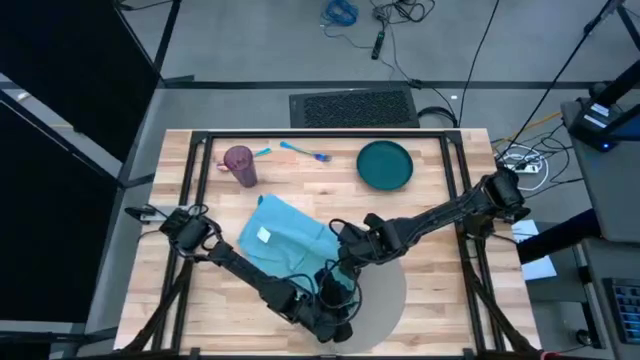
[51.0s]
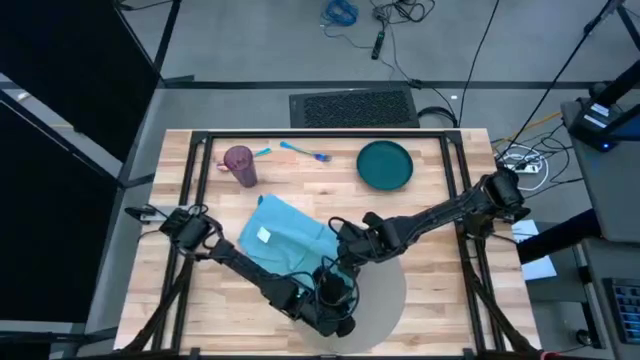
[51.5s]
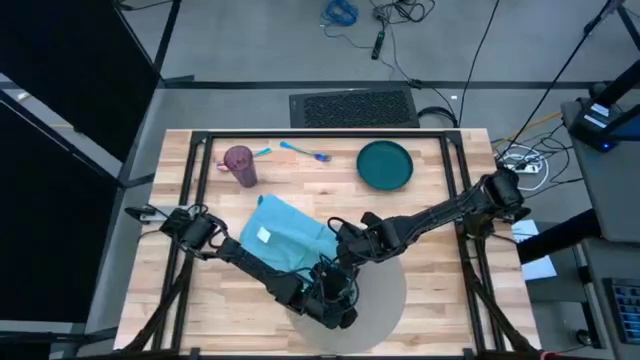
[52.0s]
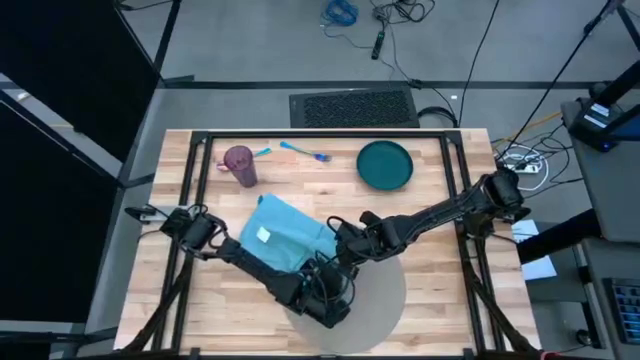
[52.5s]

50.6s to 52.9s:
Task: Set table place
Fold the blue napkin

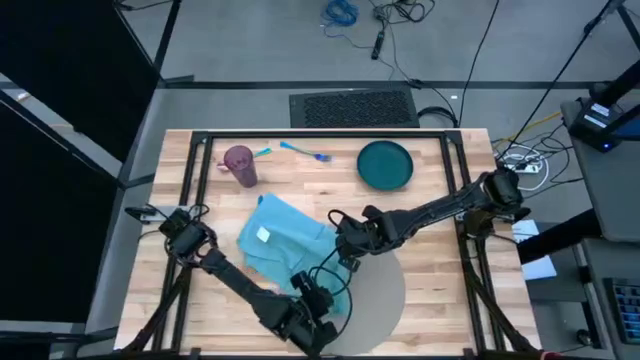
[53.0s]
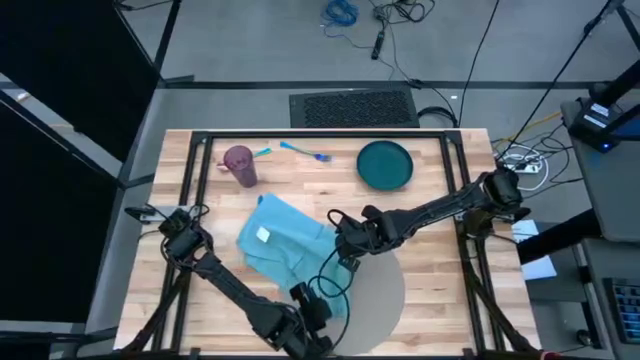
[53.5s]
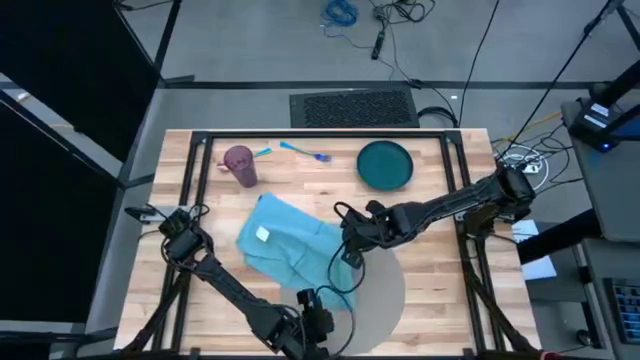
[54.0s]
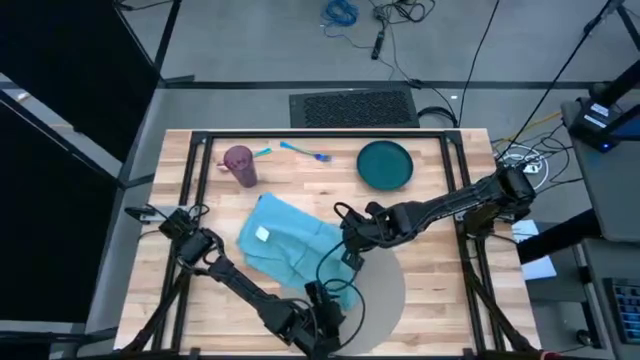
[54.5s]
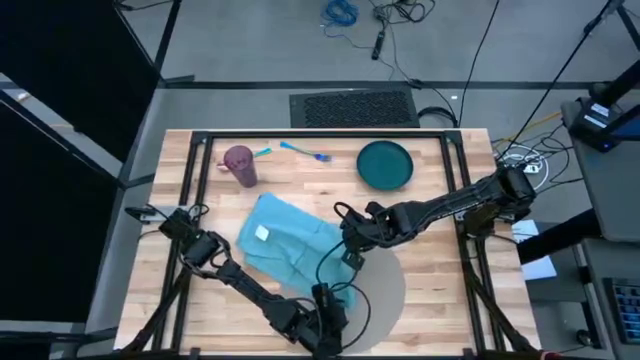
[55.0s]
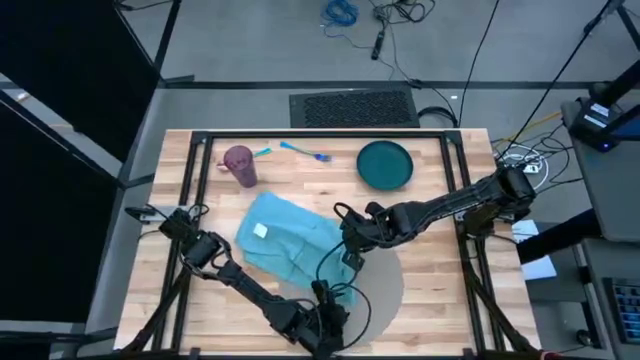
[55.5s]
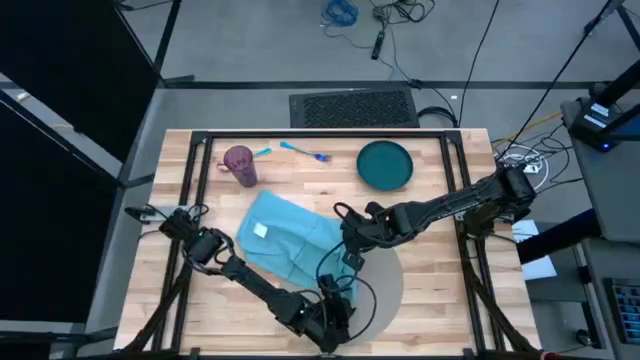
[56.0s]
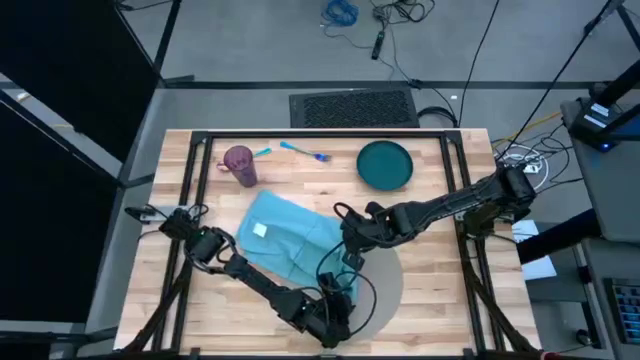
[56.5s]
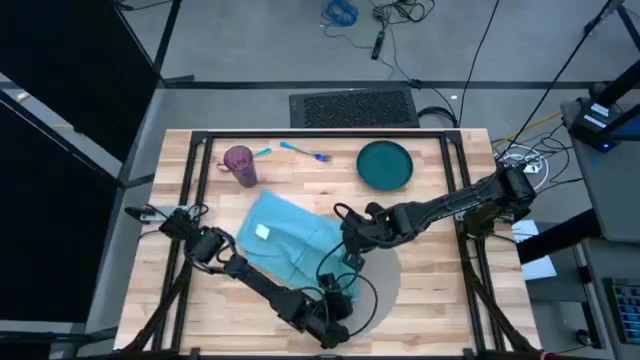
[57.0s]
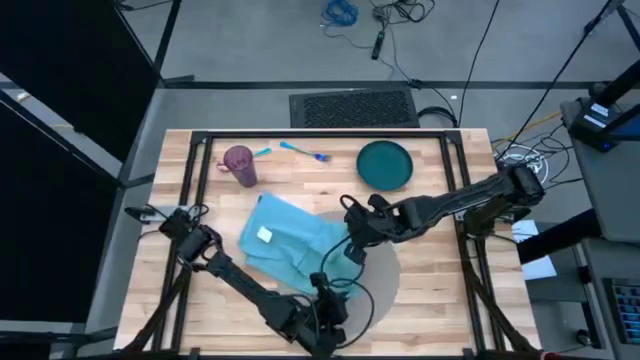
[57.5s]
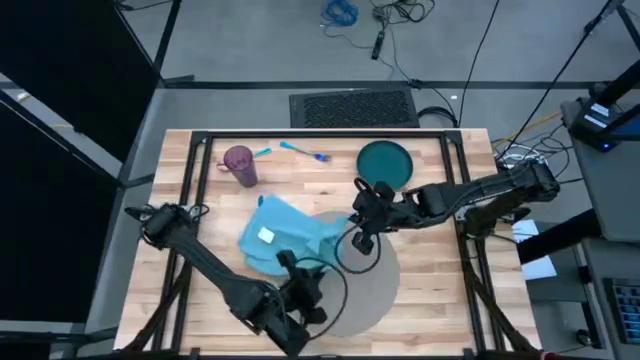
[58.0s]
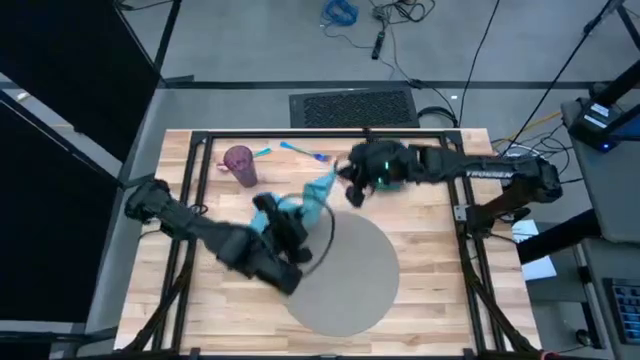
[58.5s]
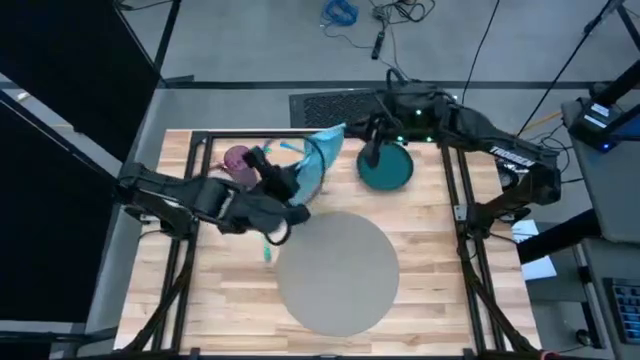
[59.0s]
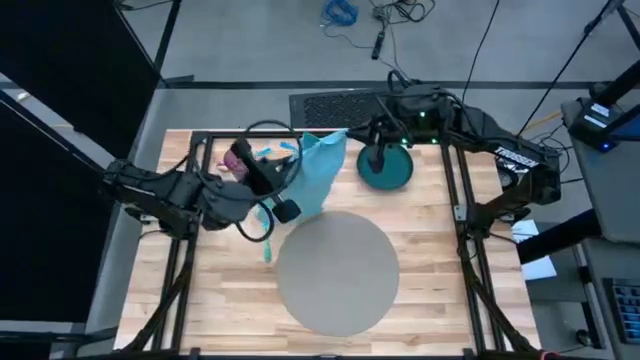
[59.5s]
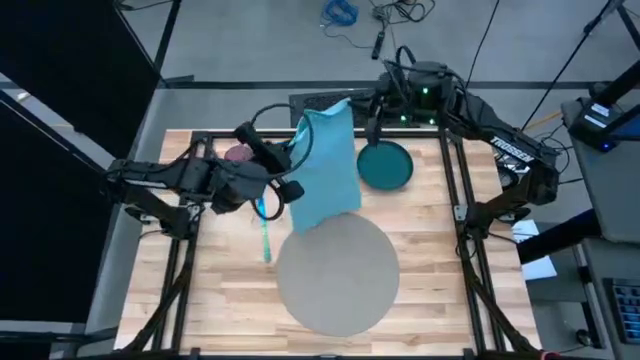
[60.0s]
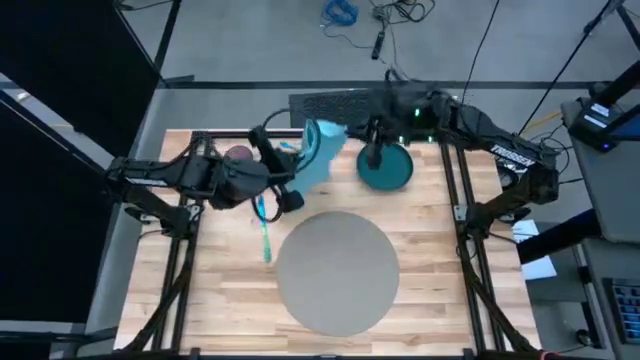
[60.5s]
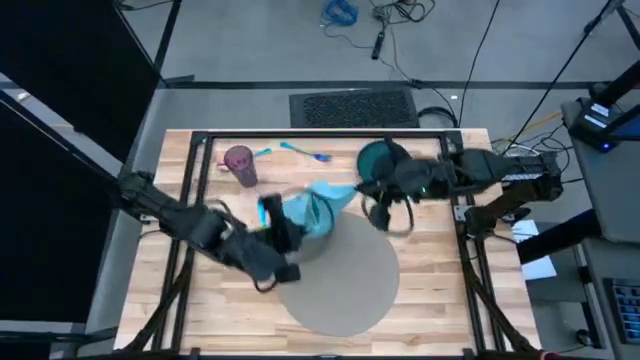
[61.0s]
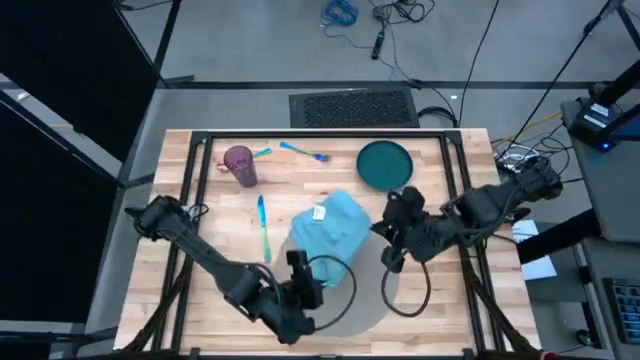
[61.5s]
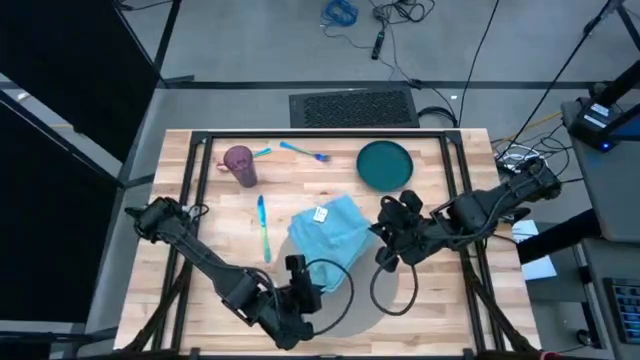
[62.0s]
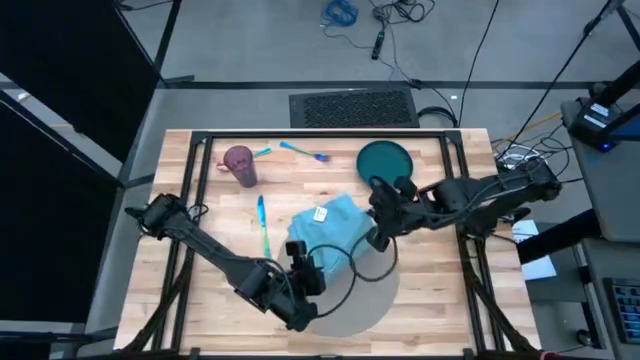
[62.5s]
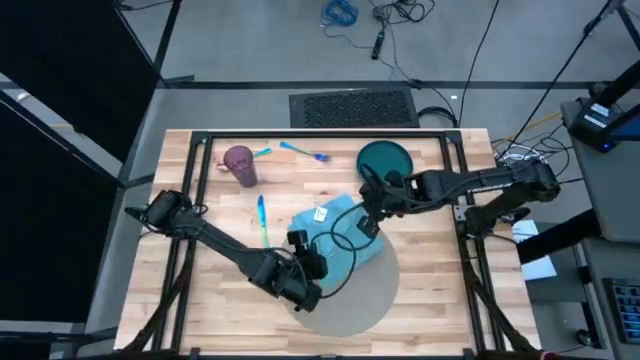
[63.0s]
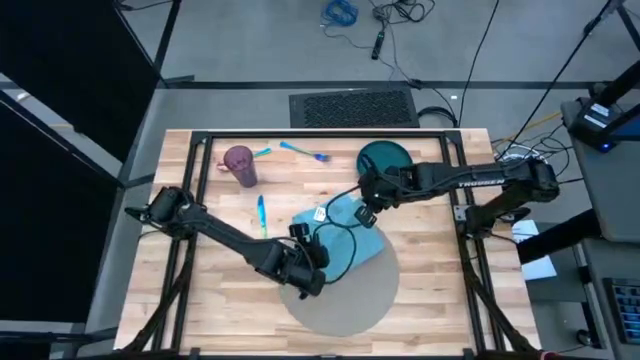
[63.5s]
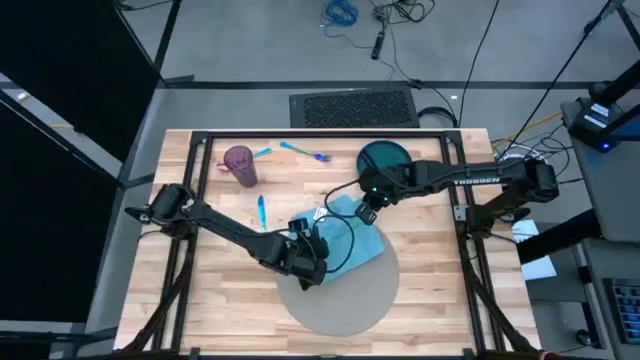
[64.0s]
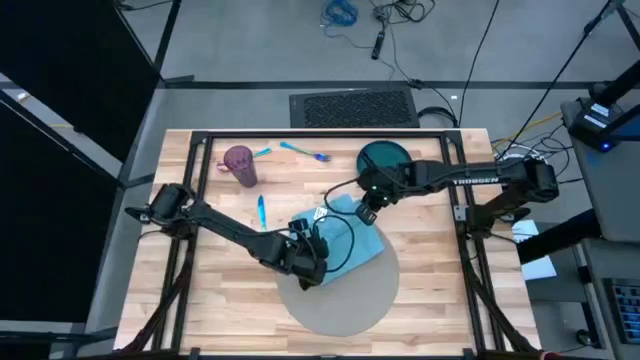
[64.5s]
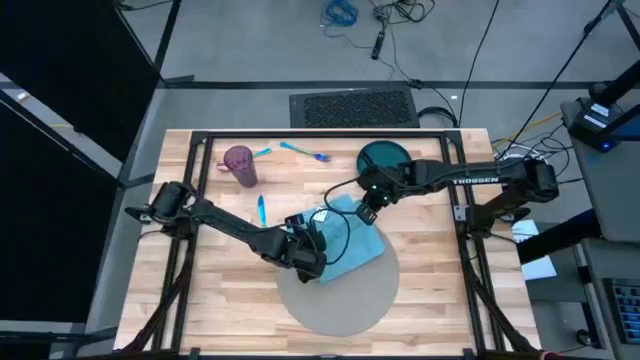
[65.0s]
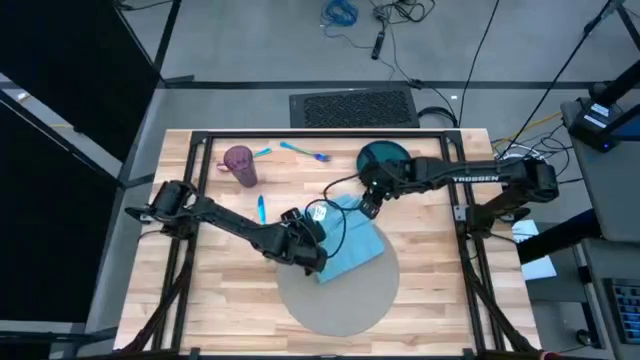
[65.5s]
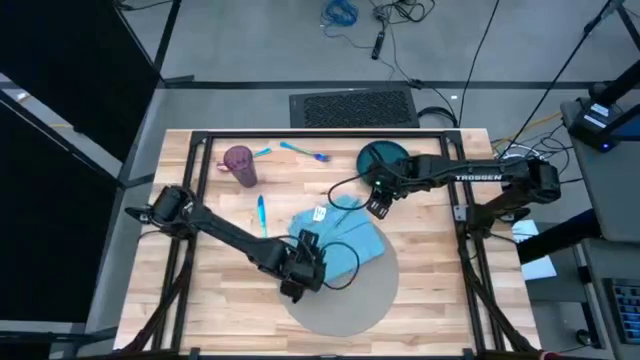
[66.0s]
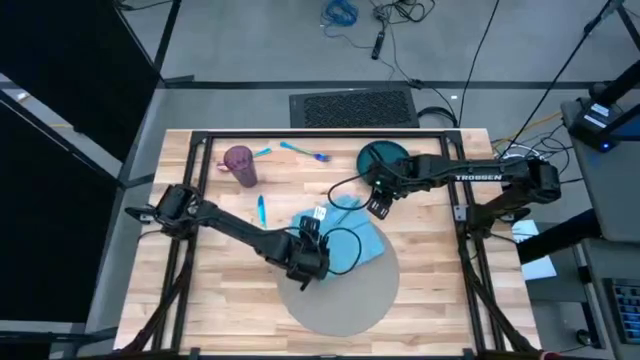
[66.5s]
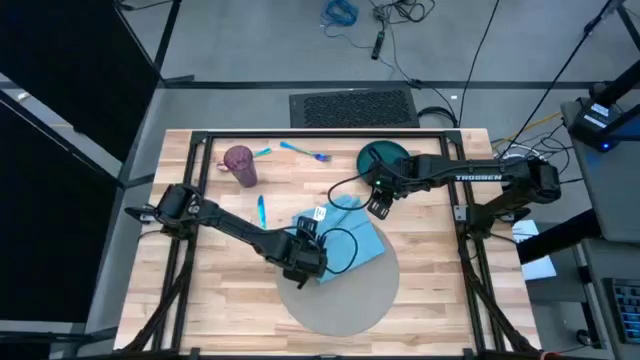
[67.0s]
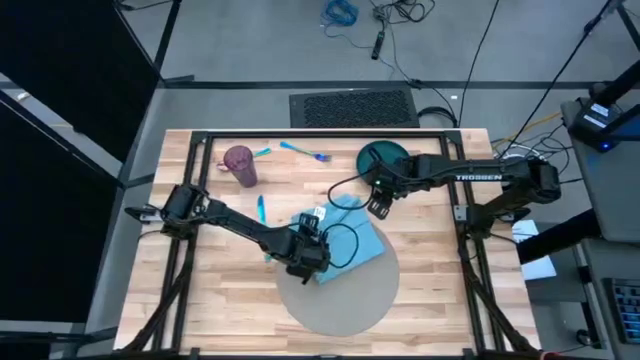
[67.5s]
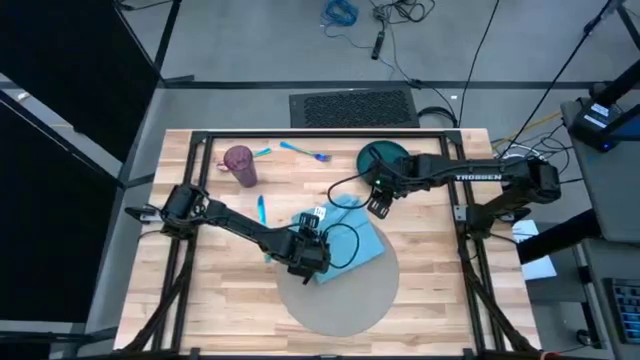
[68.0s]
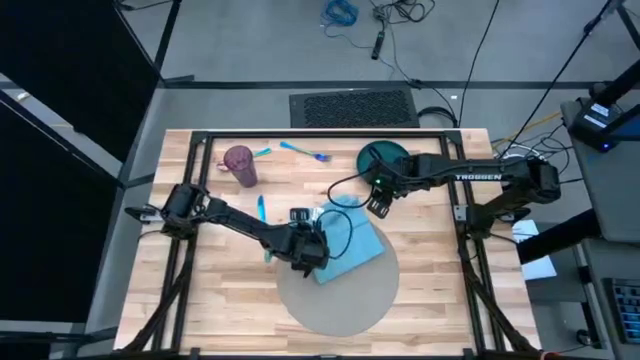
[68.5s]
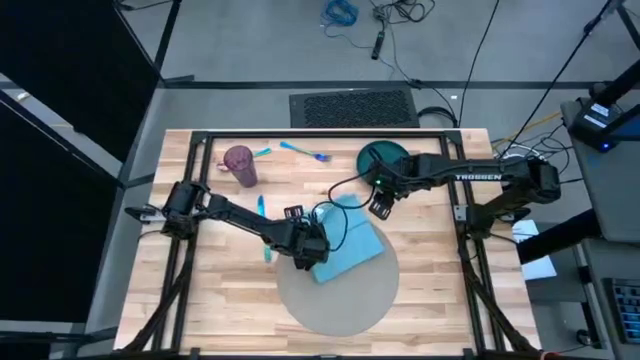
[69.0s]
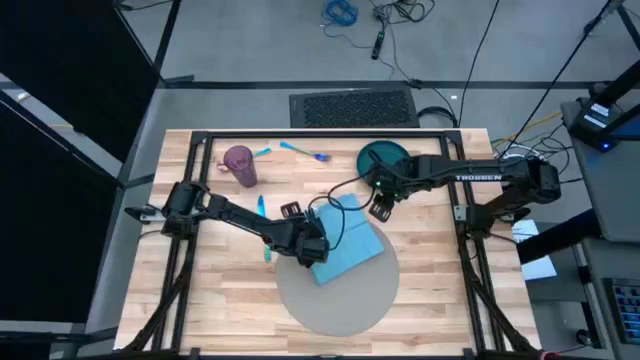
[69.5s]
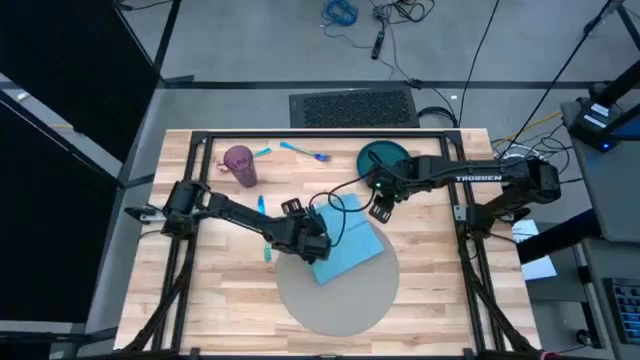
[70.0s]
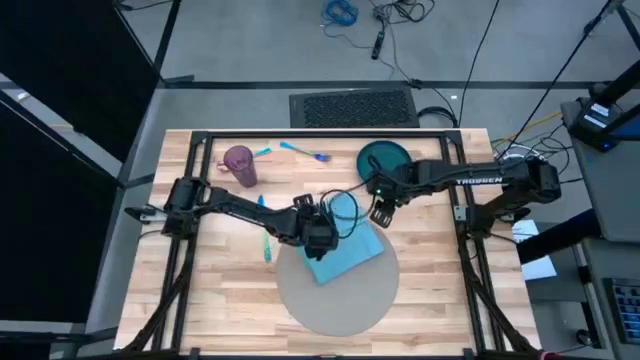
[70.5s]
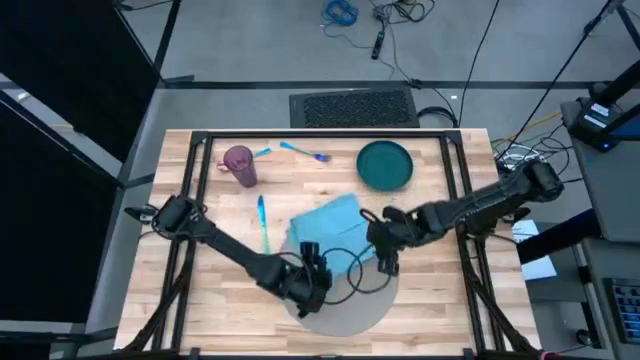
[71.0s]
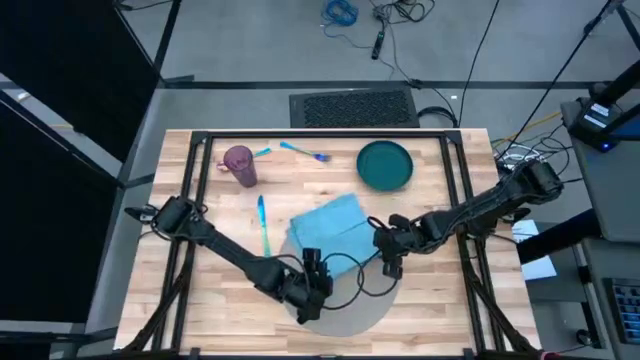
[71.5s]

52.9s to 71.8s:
Fold the blue napkin
